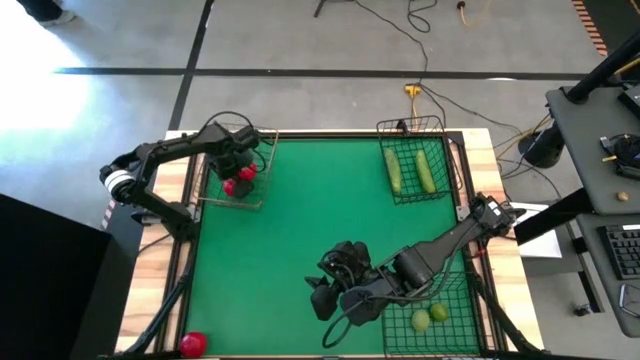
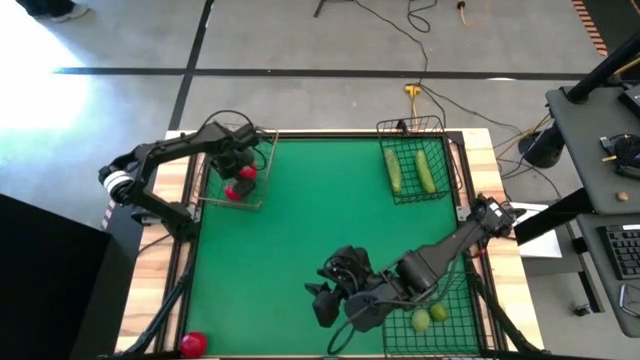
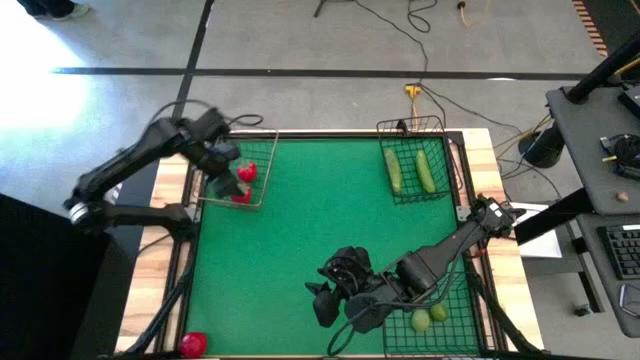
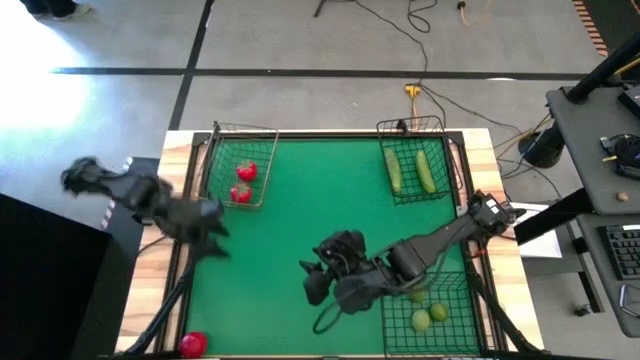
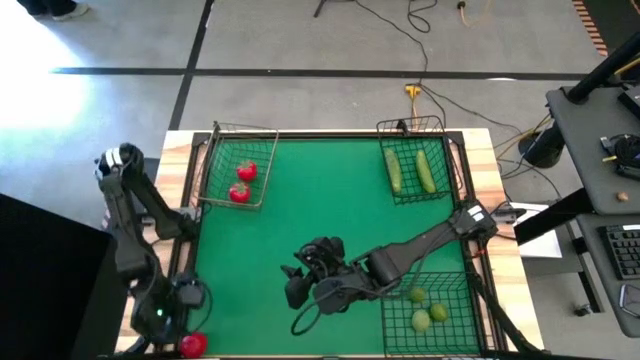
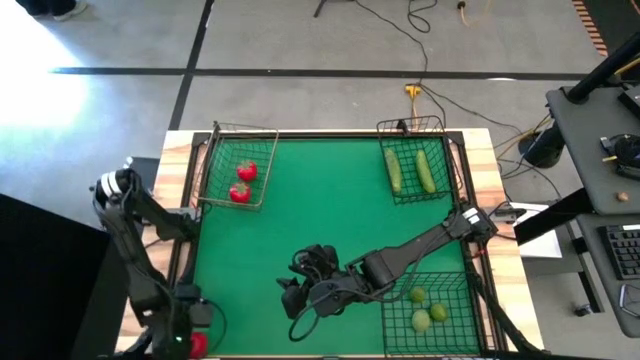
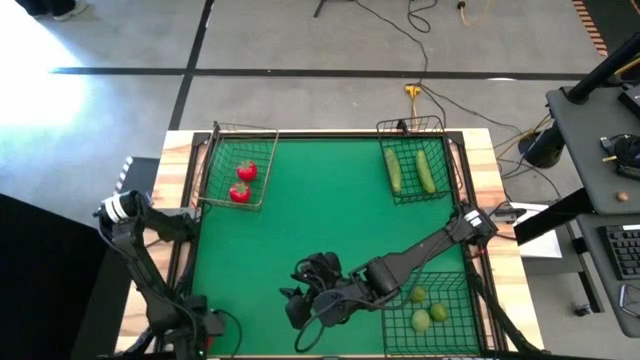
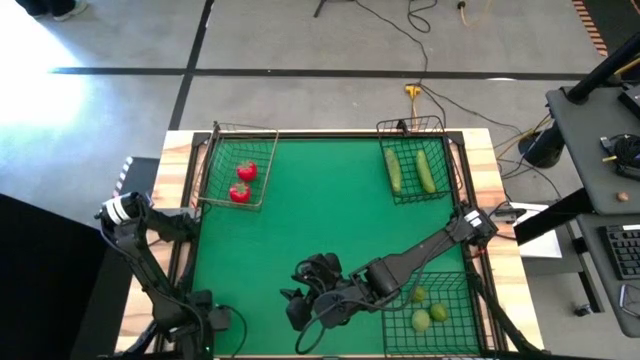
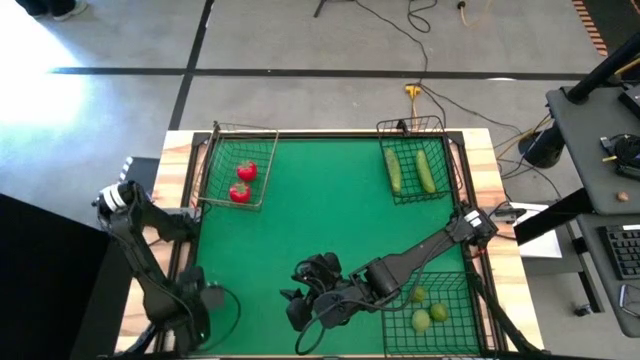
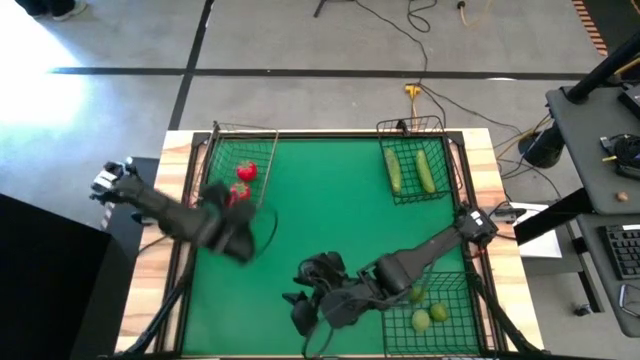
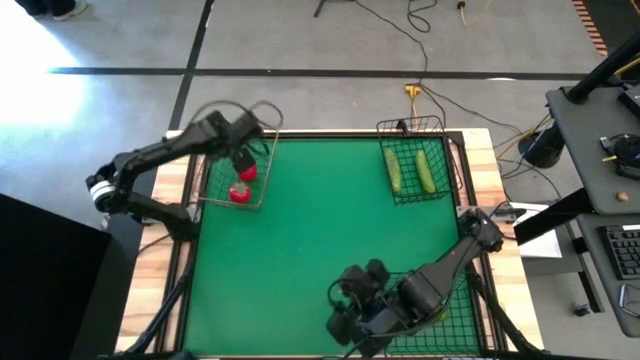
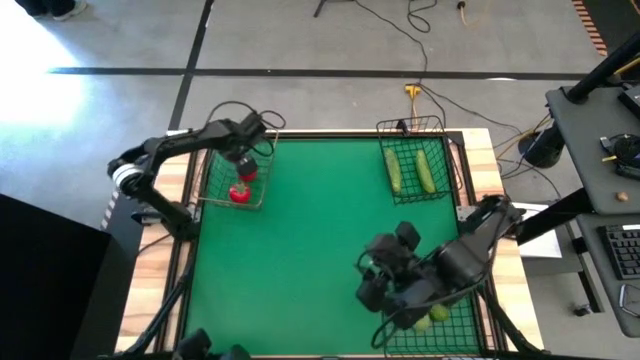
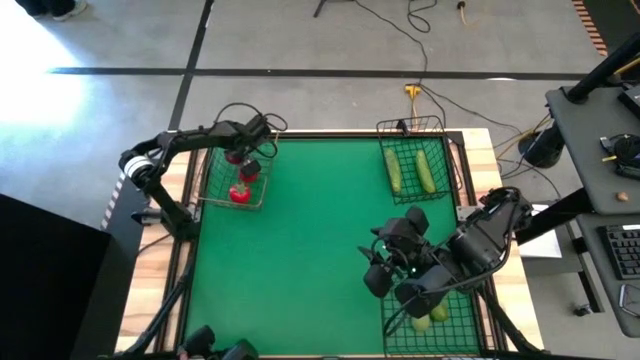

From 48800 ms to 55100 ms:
Task: Sort produce into baskets
Put the tomato into the top left wire basket

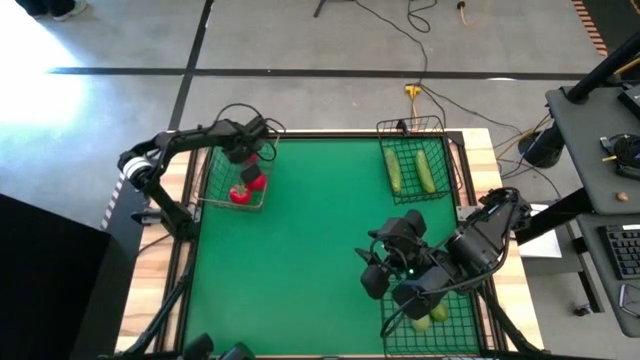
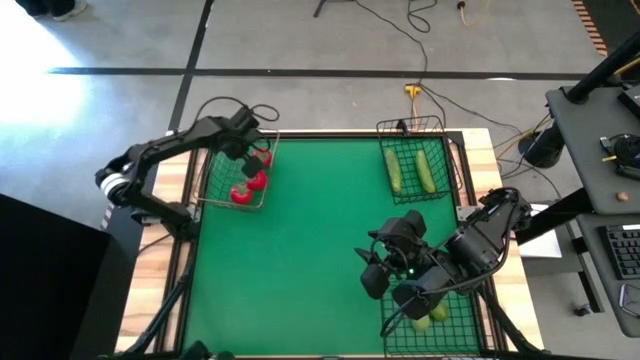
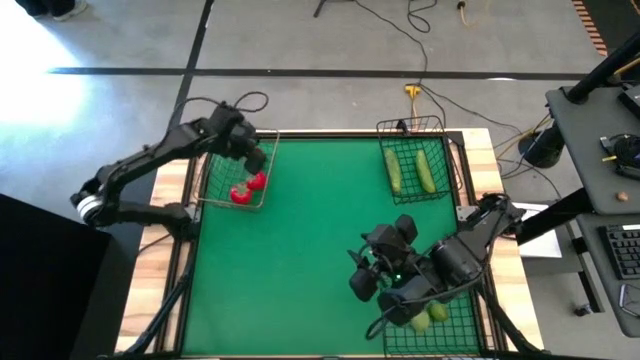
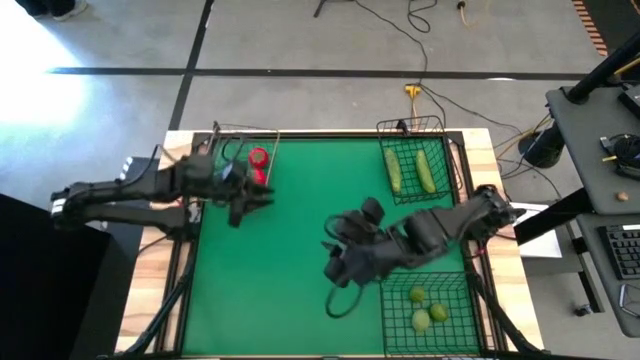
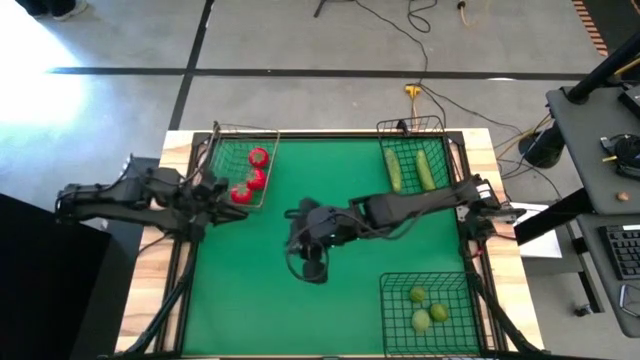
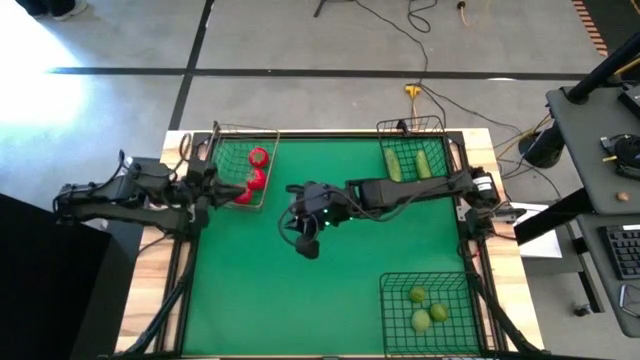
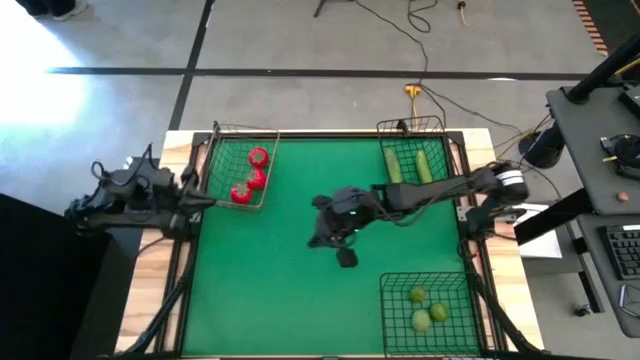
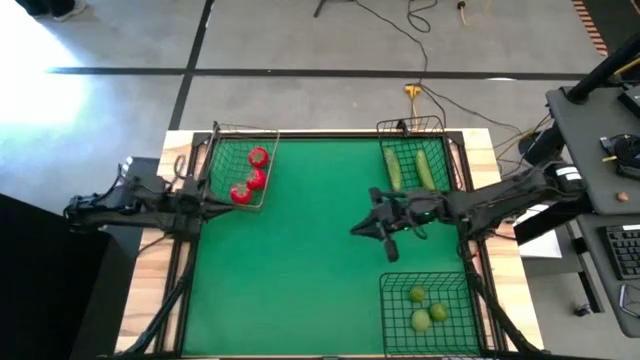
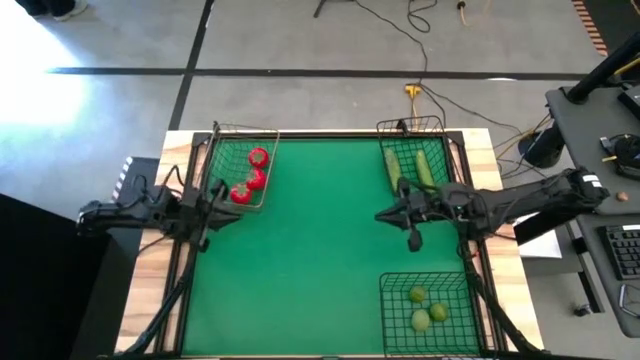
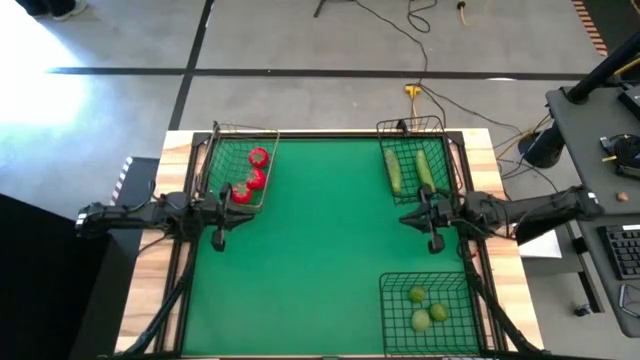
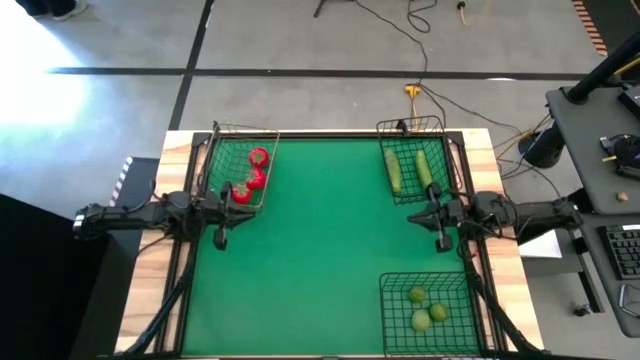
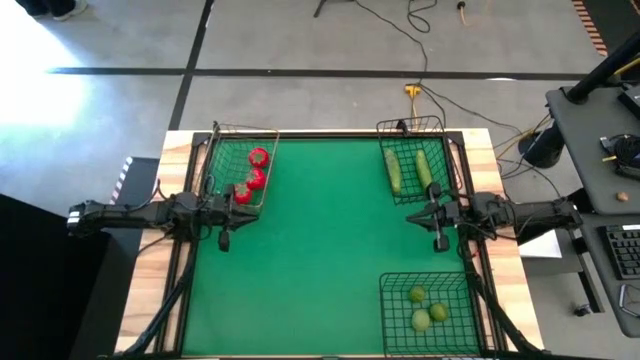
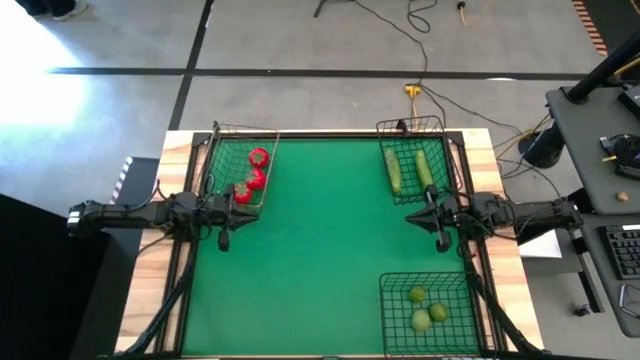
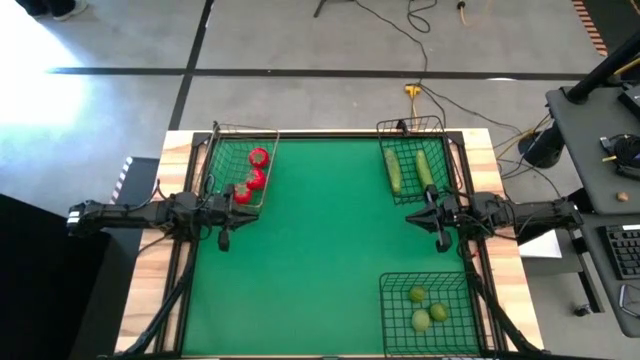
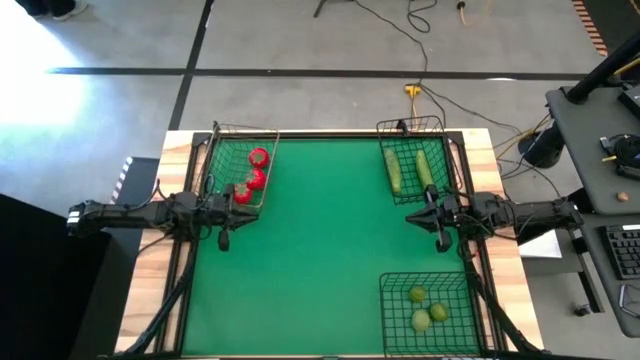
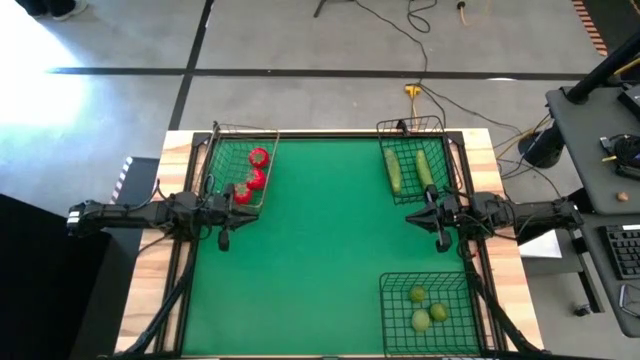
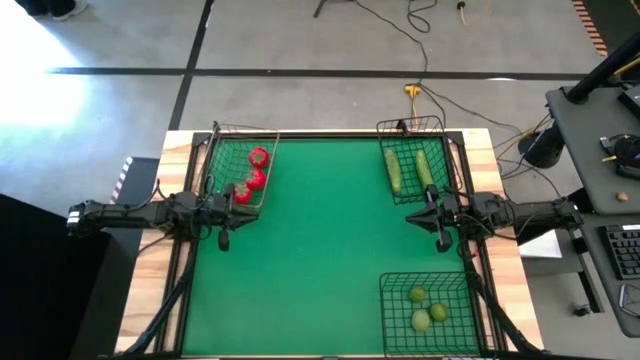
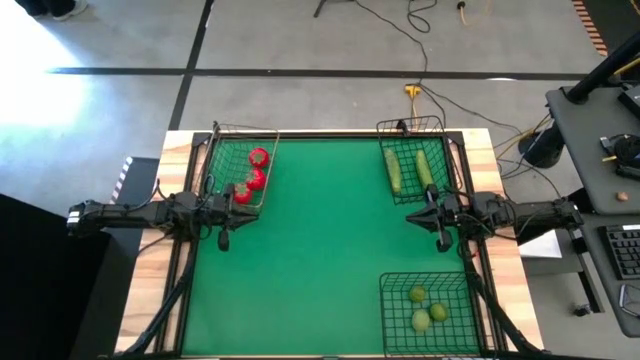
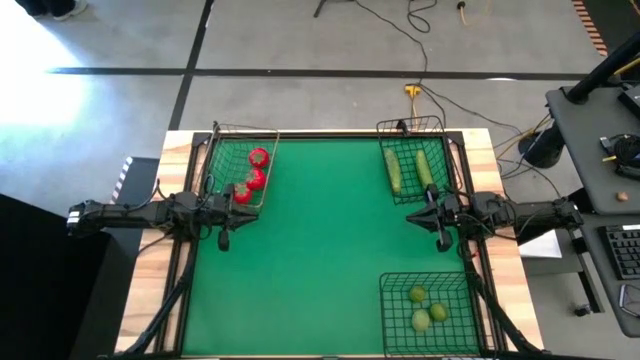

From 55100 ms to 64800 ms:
Return to Home Position

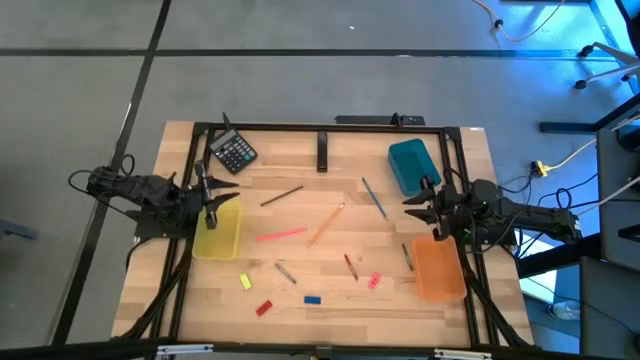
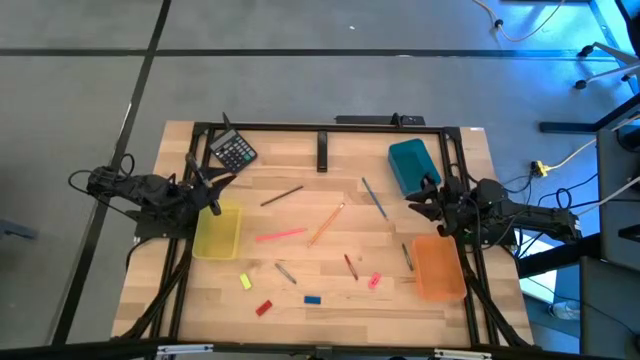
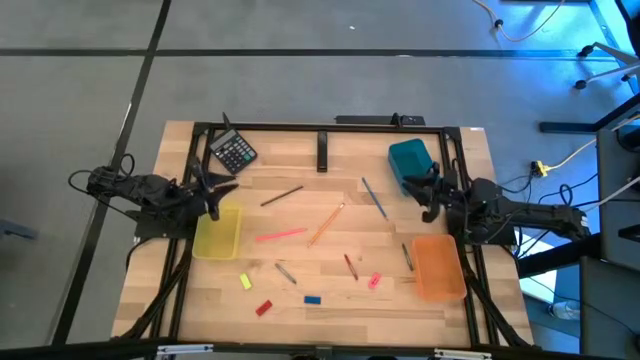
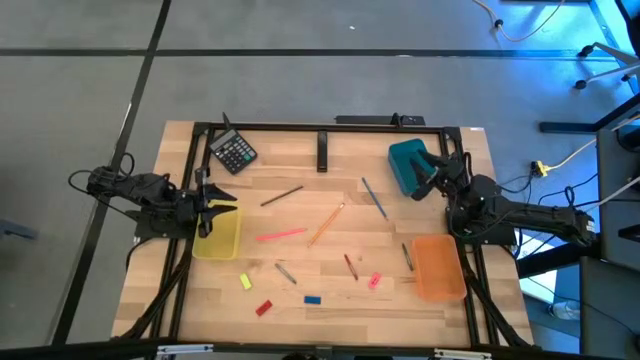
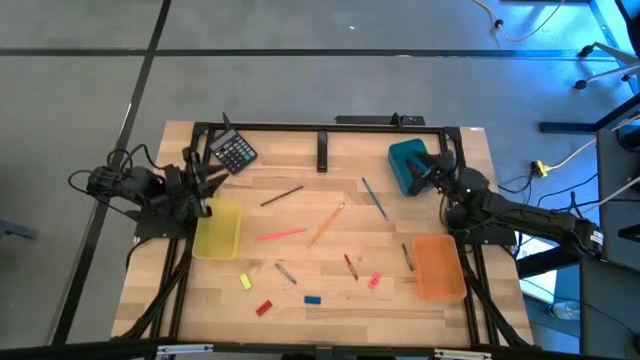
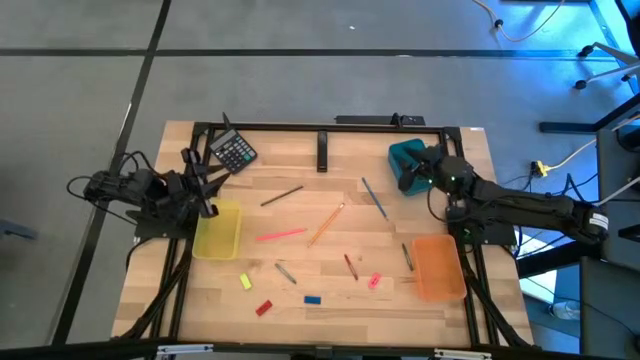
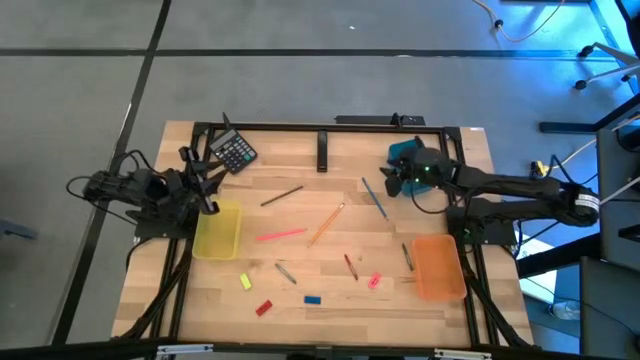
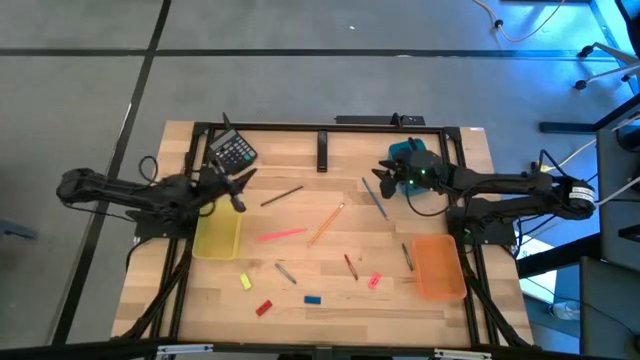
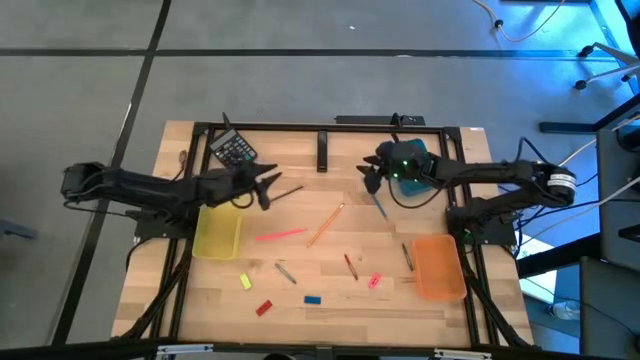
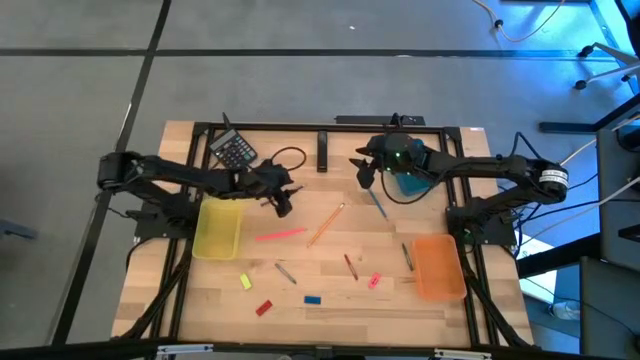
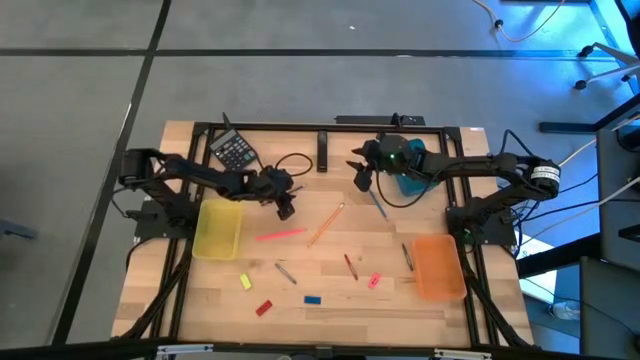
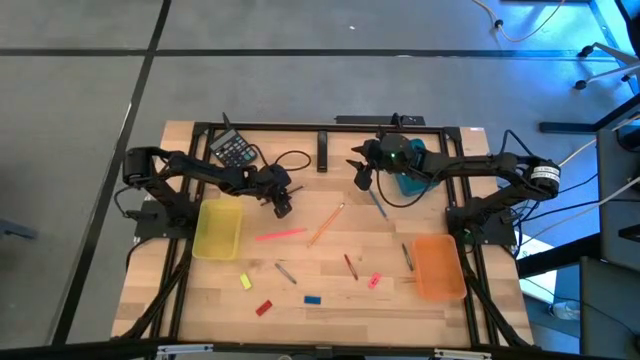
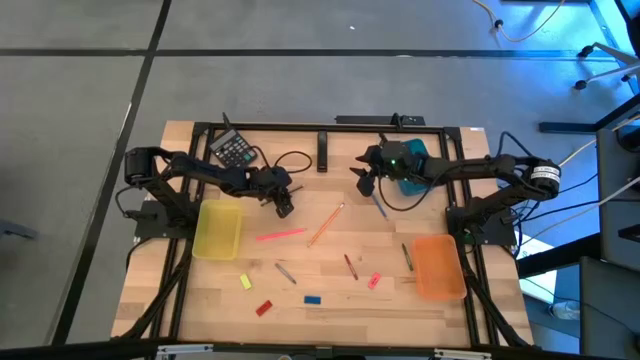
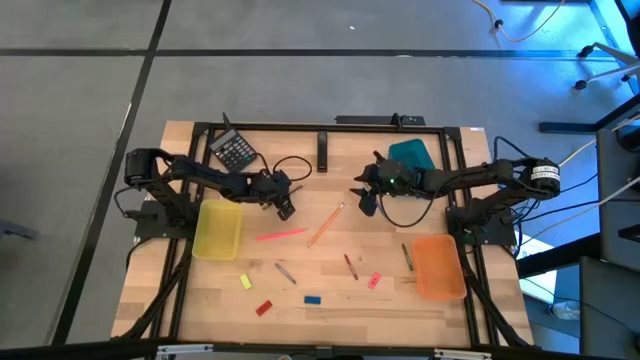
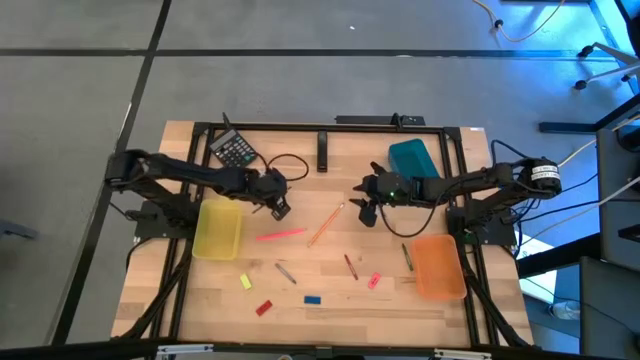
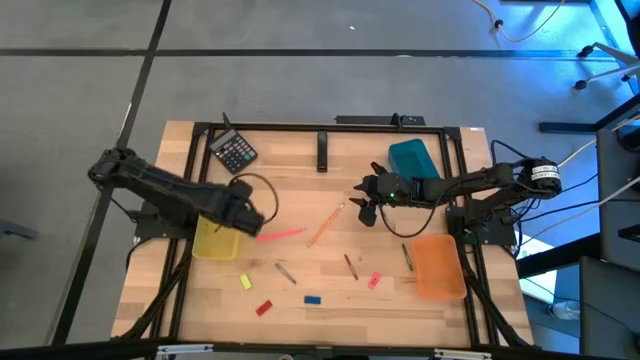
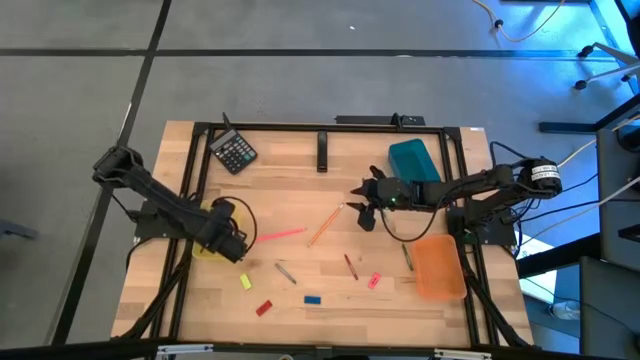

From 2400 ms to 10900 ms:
Task: Sort crayons/erasers/pens/pencils in bins
Put the black pencil into the yellow bin
